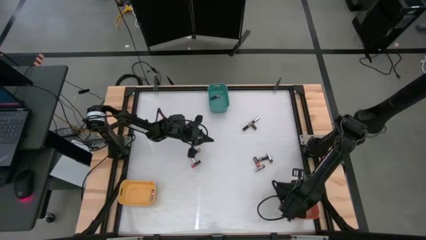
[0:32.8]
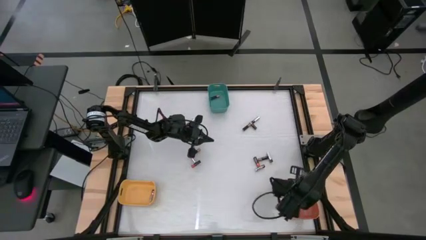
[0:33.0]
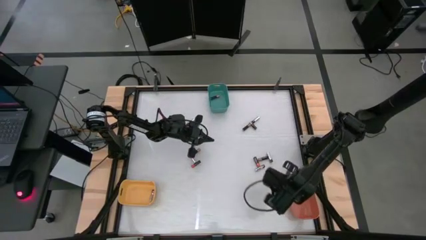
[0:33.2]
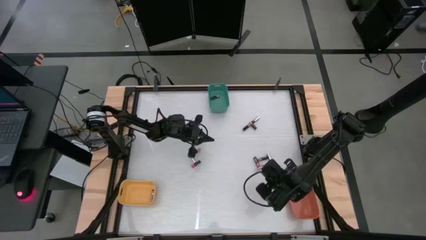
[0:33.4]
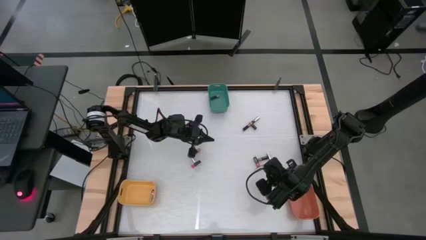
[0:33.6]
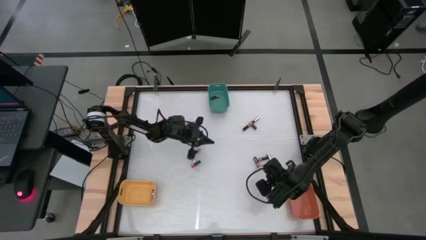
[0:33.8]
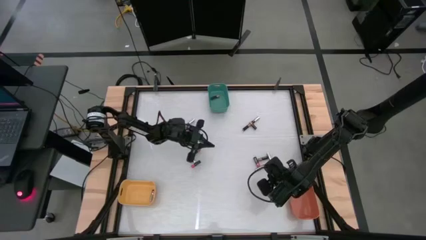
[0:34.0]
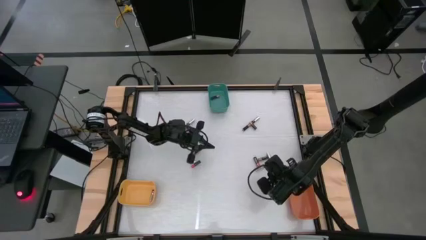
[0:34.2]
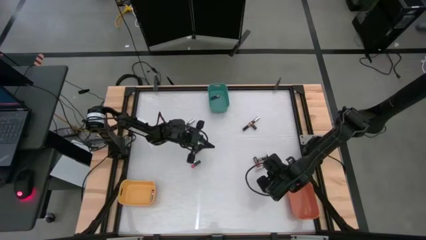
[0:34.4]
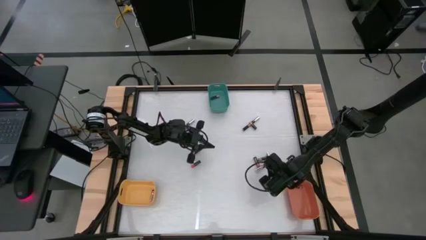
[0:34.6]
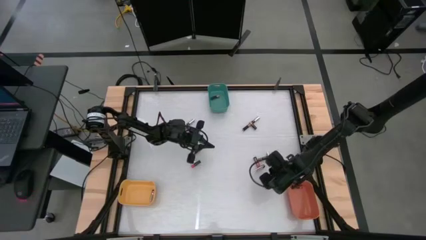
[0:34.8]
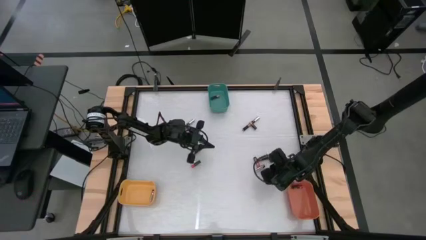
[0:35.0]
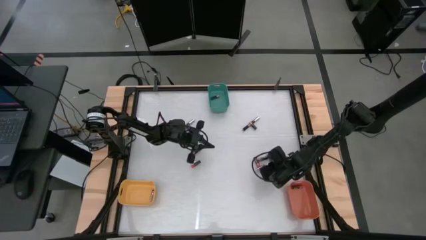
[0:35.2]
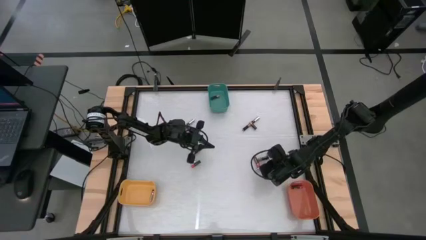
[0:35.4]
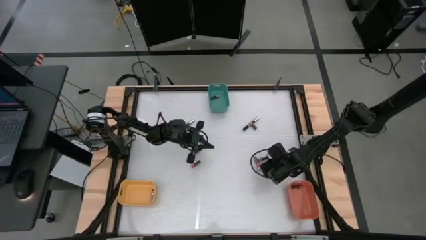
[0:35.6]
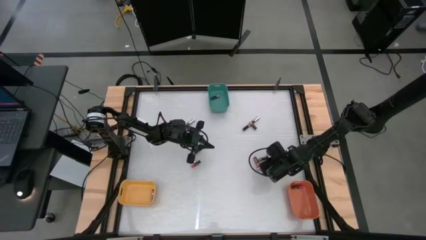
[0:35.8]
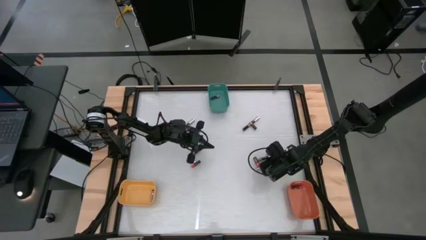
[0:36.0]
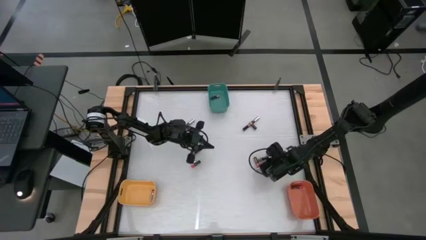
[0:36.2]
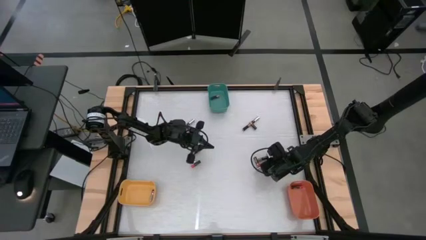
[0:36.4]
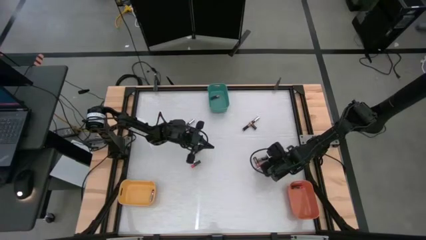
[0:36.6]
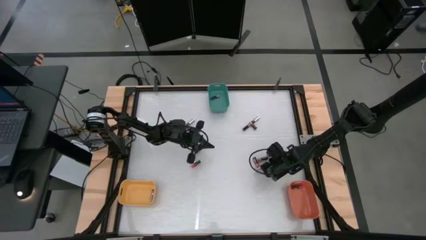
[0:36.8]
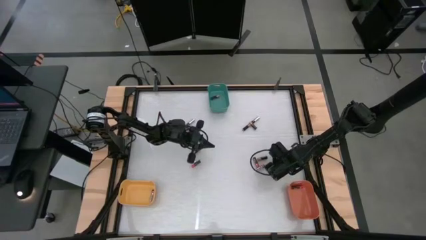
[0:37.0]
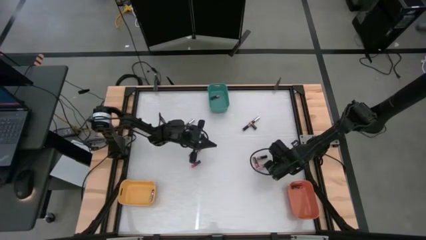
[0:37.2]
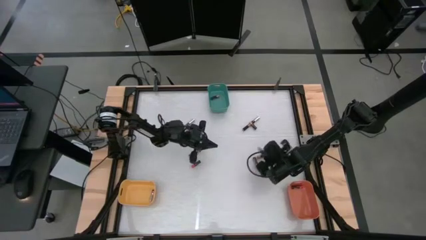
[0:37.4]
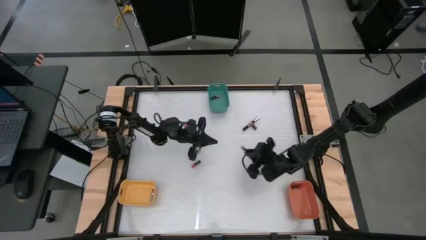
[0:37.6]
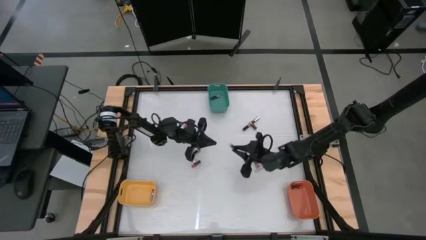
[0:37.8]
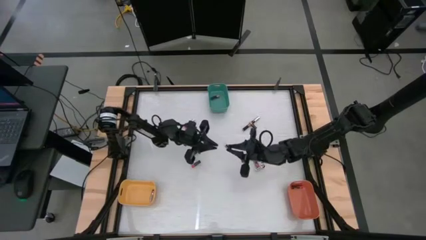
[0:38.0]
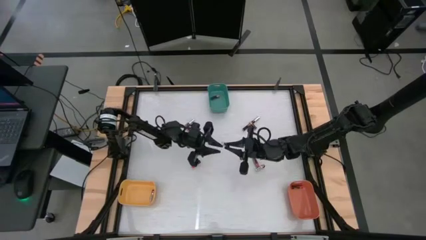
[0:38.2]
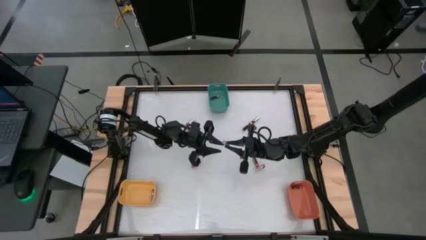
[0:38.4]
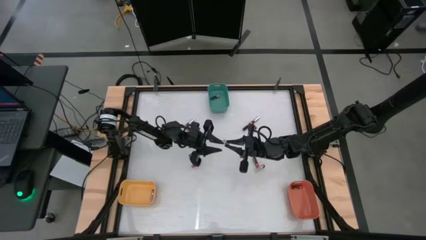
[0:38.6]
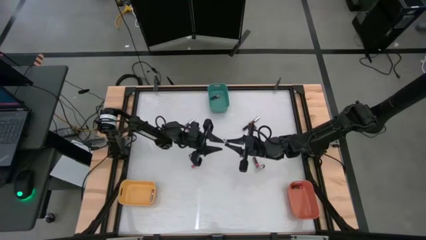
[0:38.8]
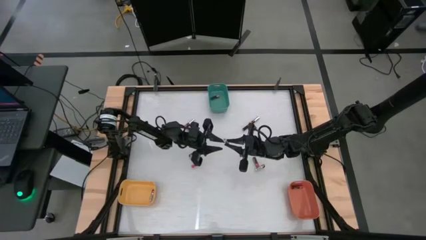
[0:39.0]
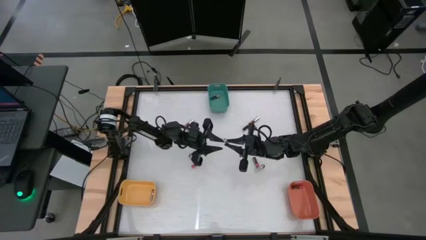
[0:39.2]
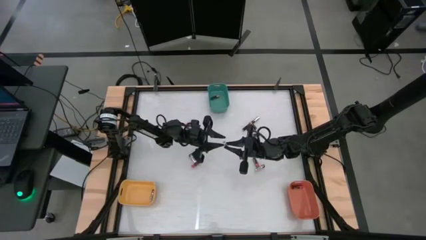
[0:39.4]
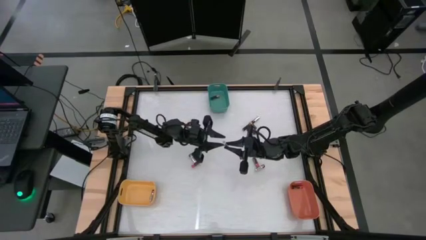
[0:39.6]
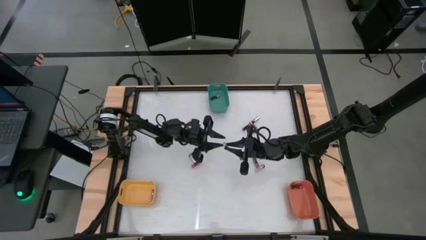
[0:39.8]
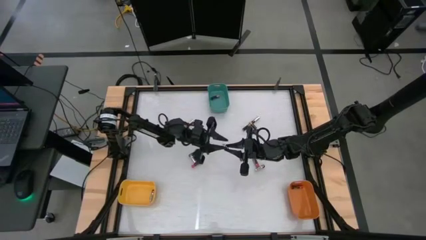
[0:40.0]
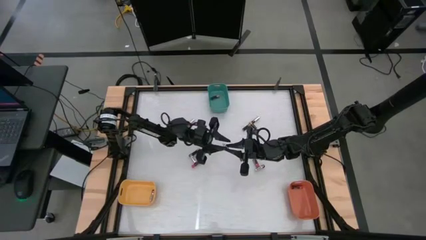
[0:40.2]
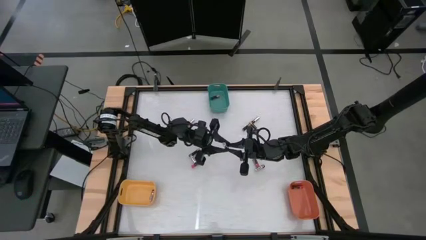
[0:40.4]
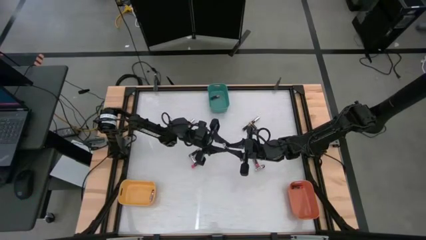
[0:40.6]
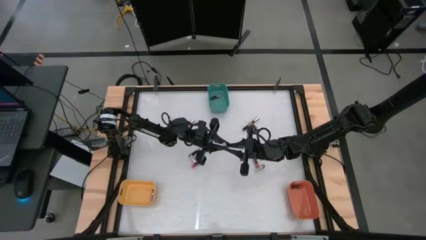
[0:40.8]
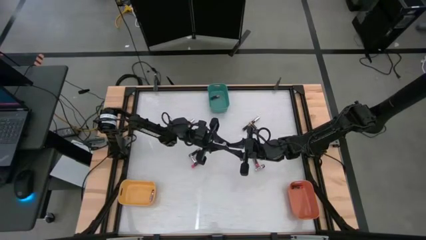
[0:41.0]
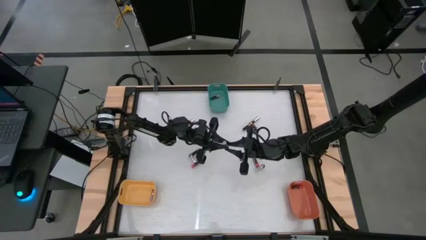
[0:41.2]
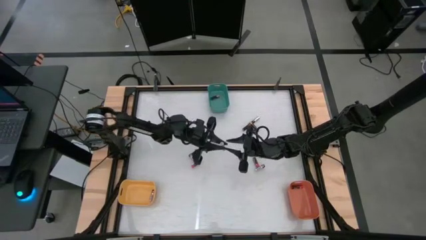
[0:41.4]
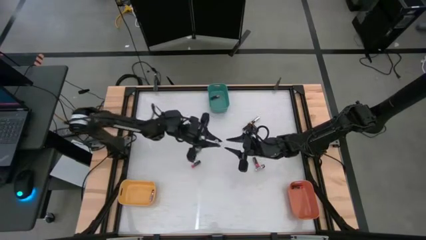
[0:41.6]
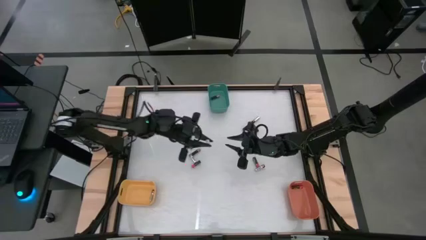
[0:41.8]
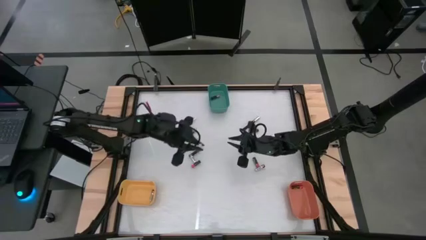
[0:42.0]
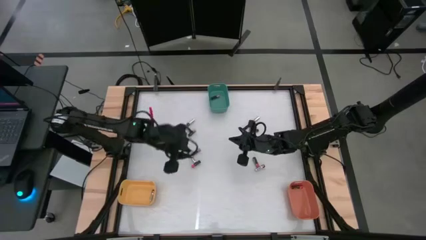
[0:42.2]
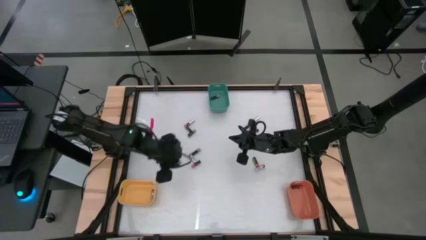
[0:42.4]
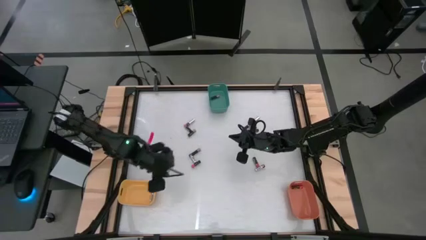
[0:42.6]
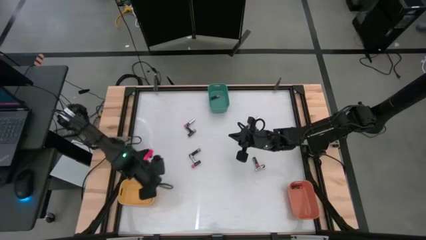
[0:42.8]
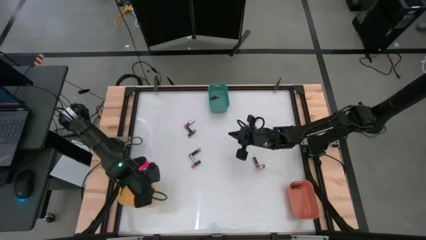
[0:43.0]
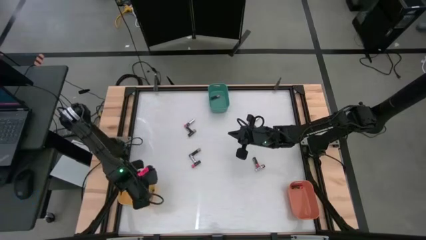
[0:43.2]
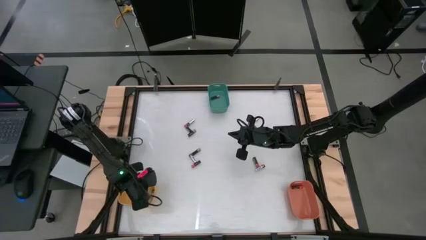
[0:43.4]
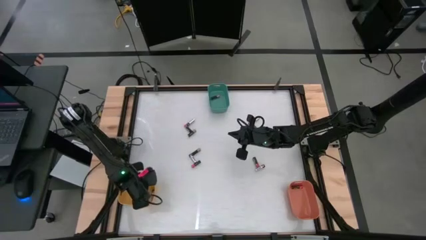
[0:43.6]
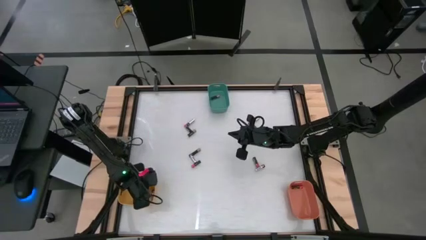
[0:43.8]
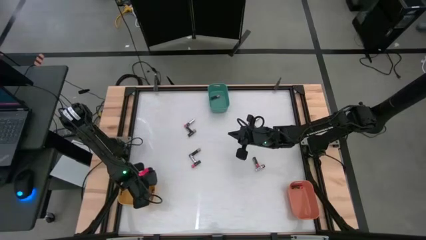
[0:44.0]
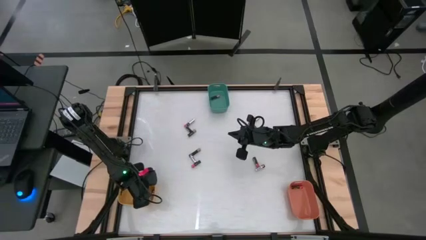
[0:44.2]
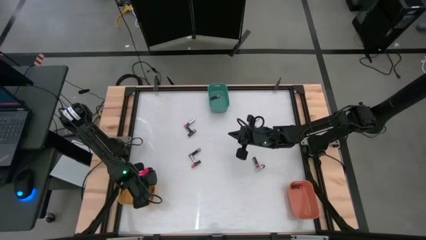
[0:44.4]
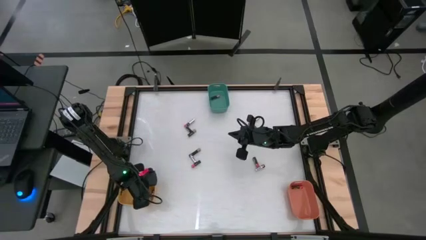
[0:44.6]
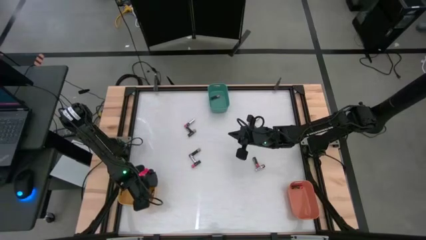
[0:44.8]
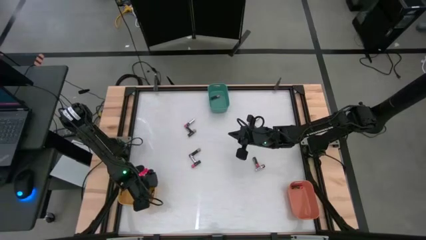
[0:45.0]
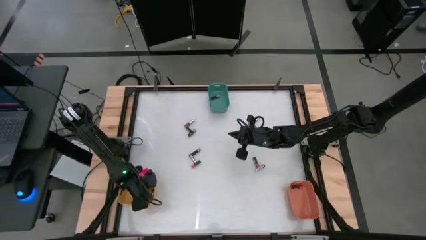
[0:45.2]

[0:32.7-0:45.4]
Task: Sort batteries
Put the silver battery into the yellow bin
